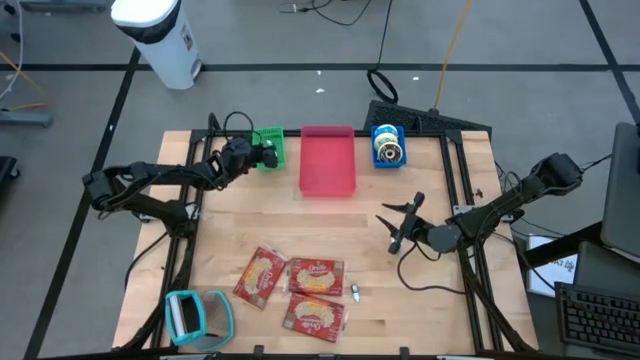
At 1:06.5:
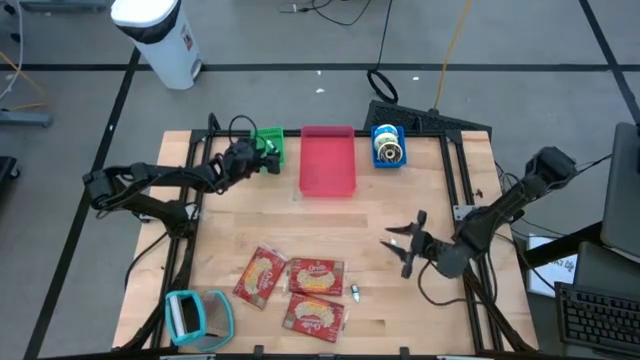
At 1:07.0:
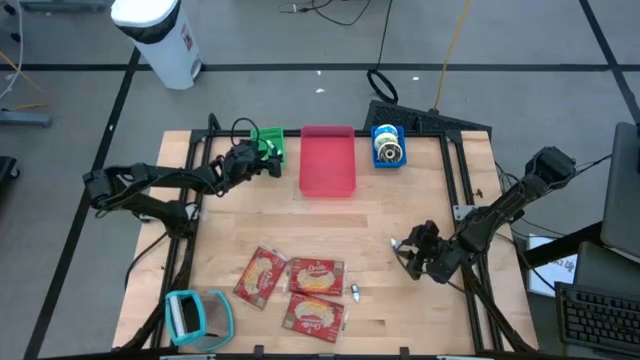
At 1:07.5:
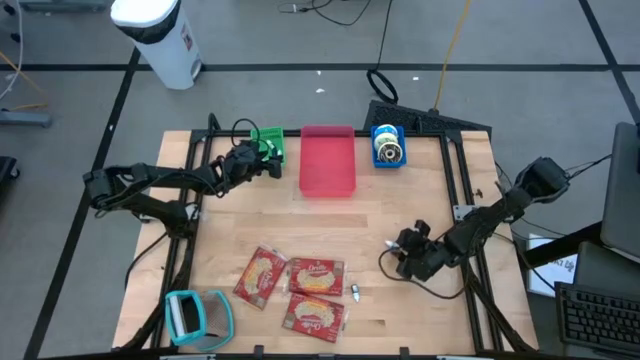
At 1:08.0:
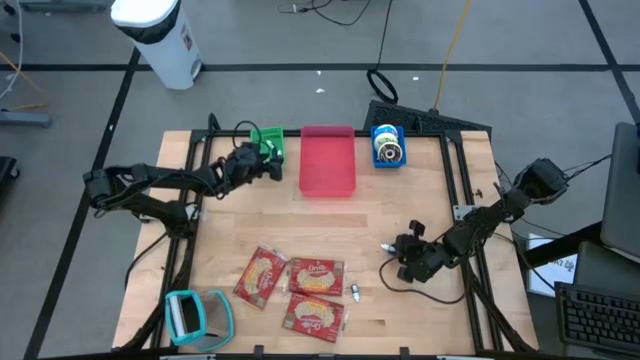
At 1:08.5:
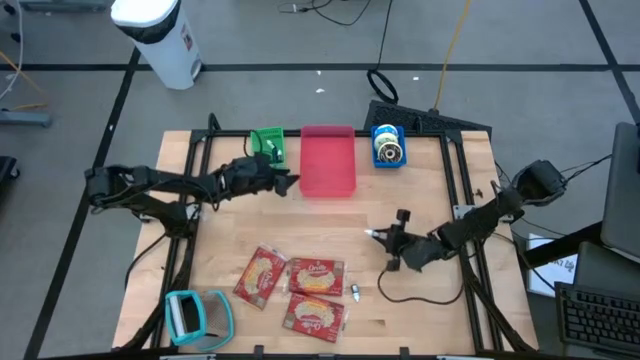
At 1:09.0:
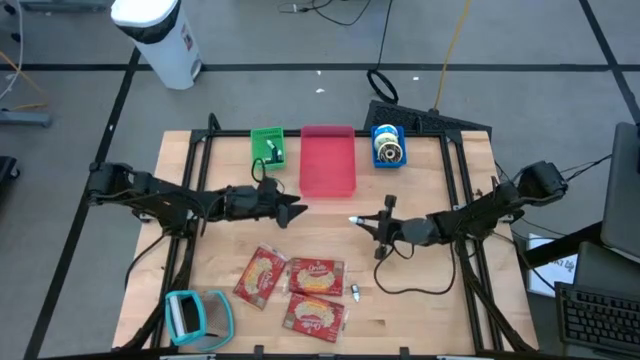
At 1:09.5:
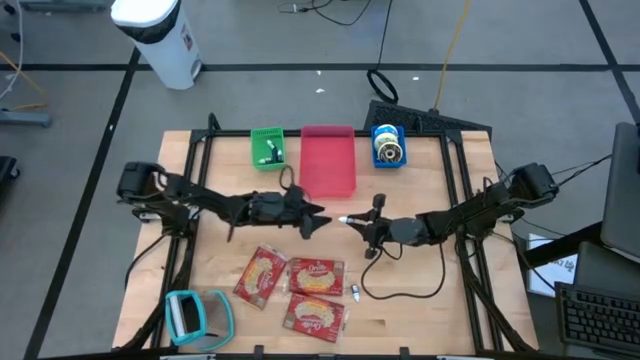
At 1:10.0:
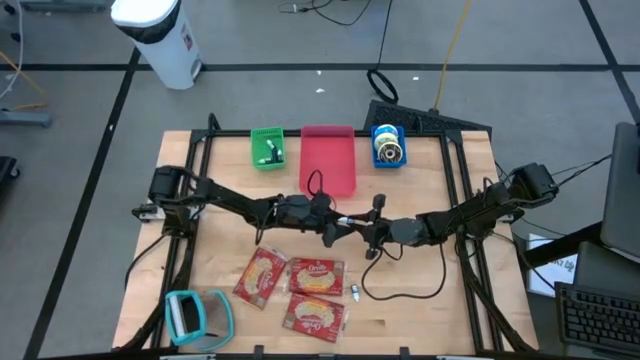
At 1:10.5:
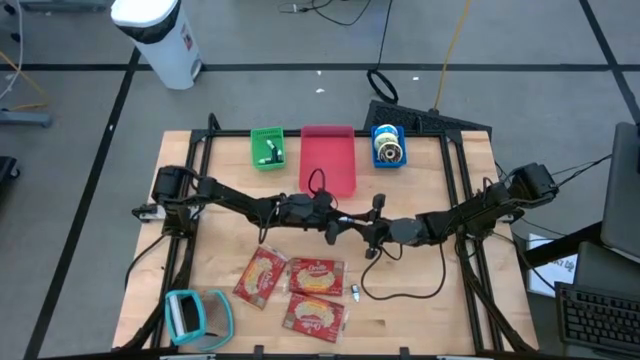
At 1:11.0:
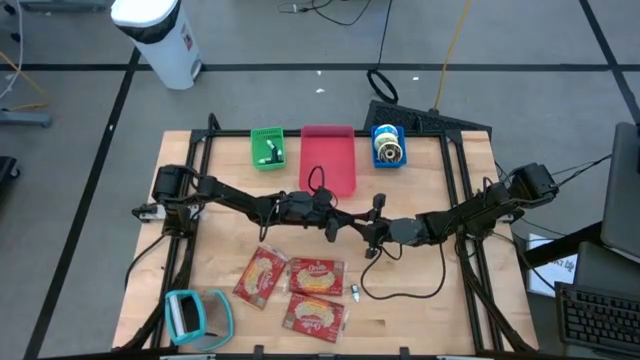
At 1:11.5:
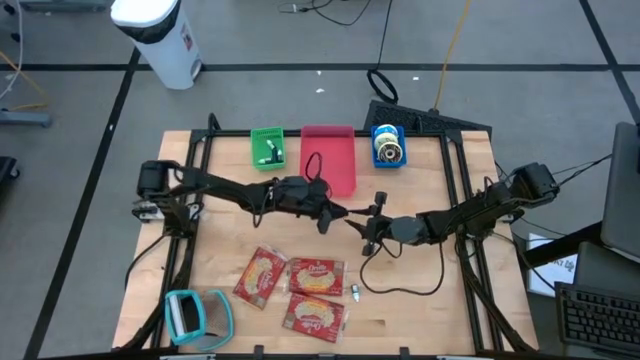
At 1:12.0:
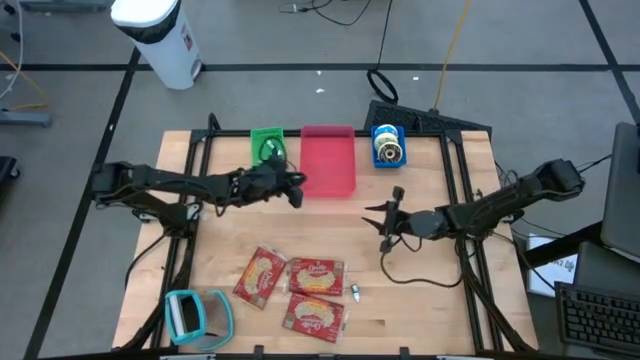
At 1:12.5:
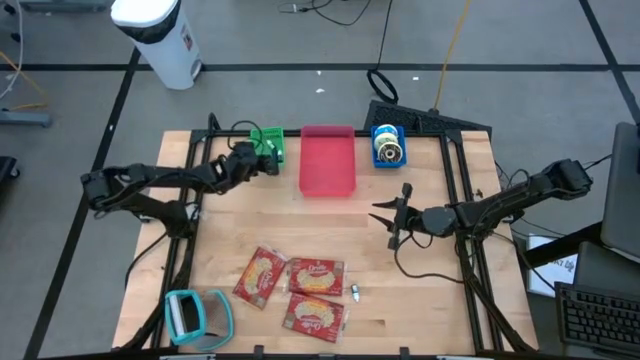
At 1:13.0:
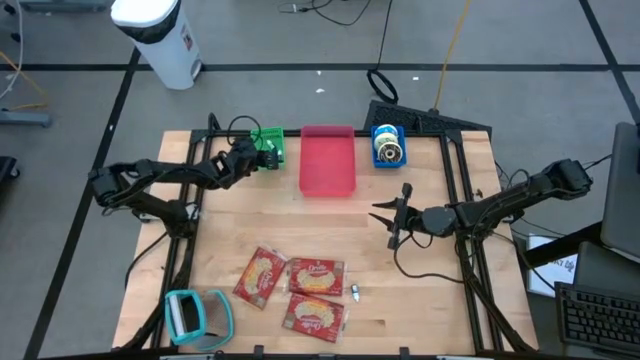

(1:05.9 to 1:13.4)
Put the violet food coloring bottle into the green bin

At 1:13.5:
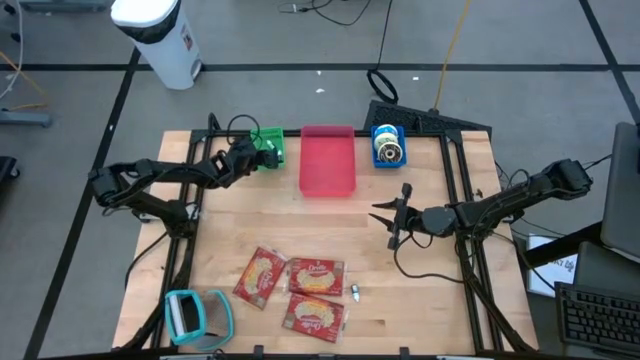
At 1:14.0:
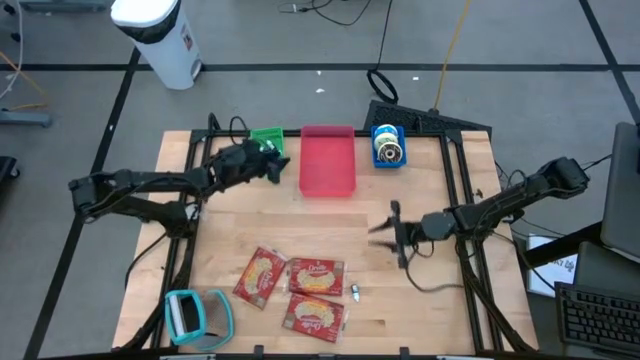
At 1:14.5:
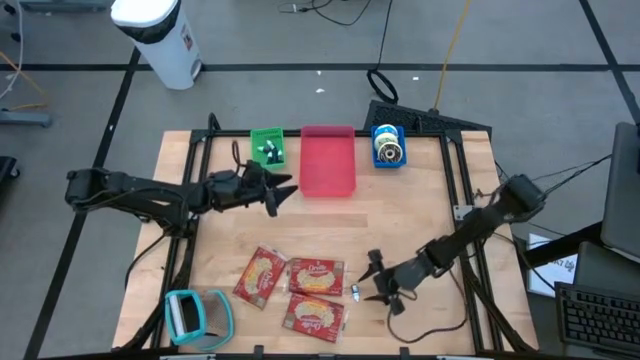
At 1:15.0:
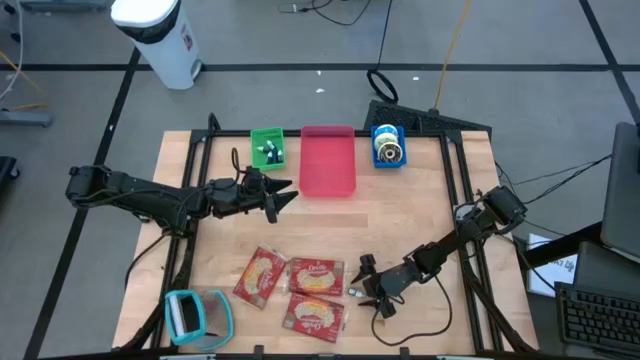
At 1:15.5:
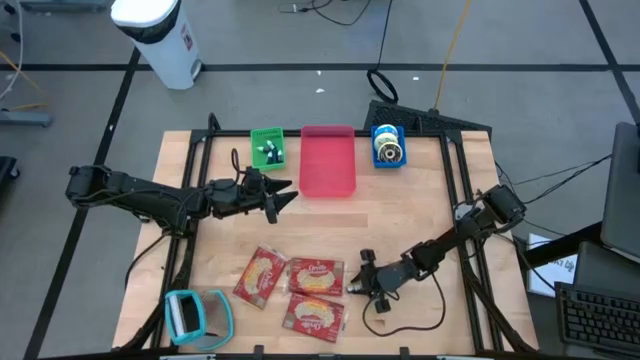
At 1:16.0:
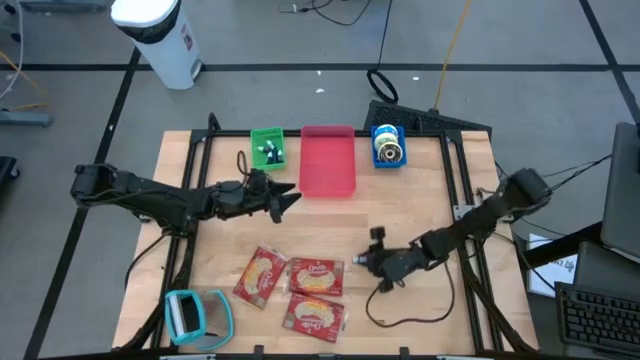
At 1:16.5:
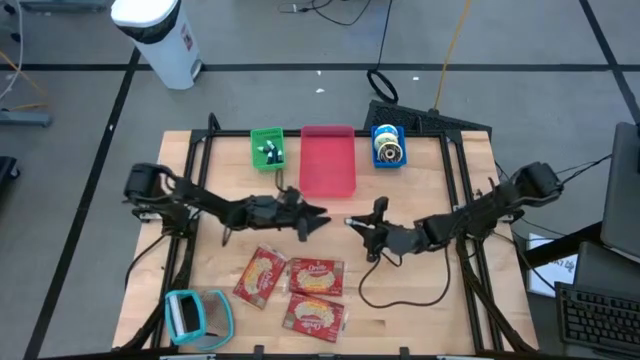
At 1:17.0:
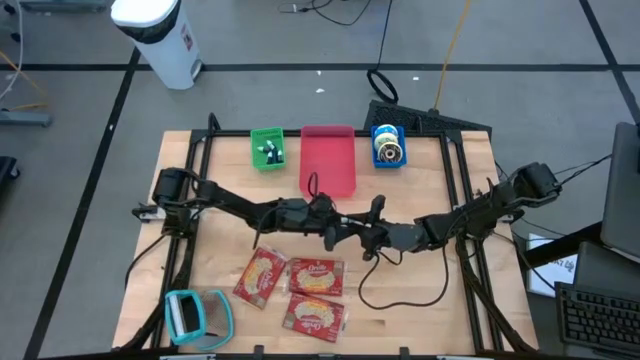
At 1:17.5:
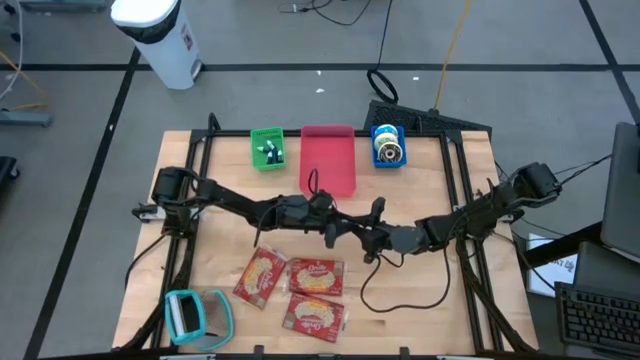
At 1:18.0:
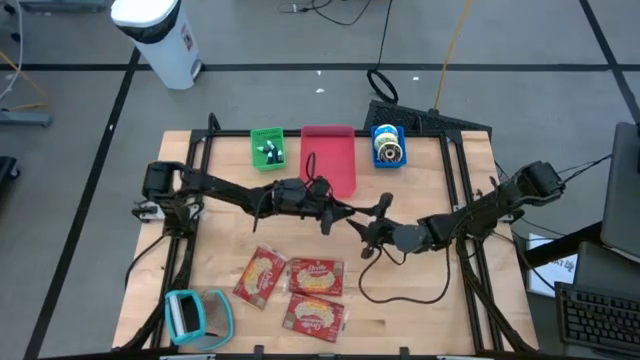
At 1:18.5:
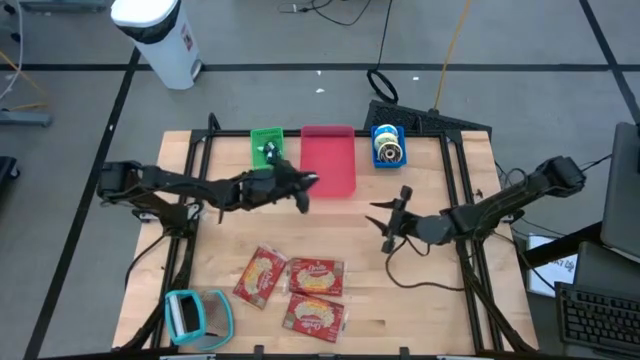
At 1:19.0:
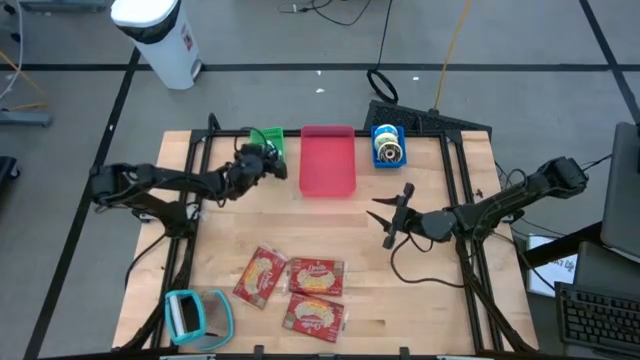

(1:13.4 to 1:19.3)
Put the brown food coloring bottle into the green bin

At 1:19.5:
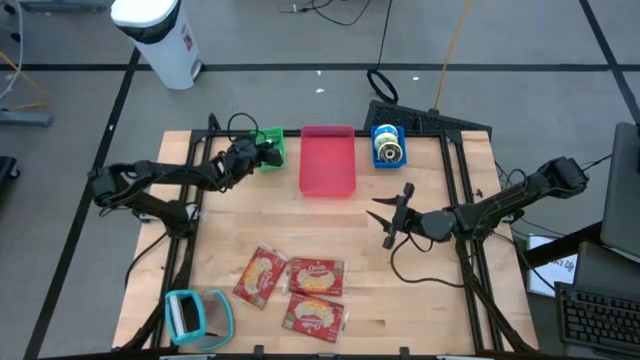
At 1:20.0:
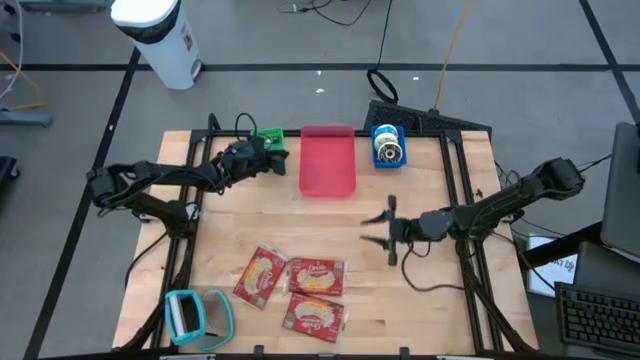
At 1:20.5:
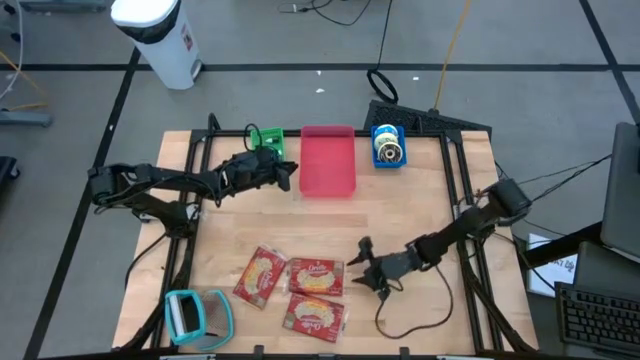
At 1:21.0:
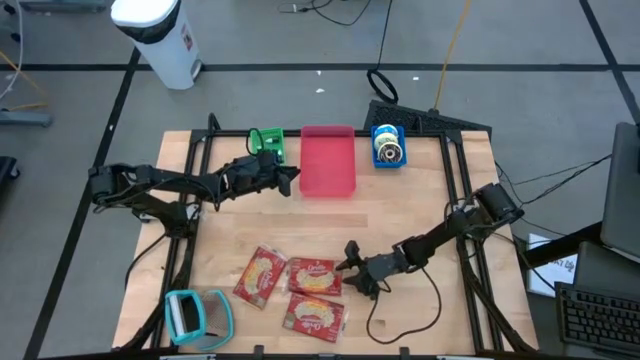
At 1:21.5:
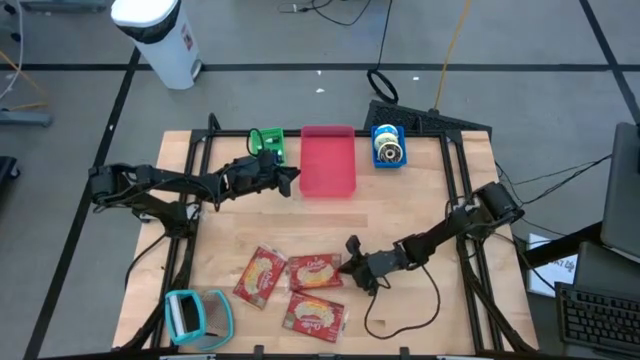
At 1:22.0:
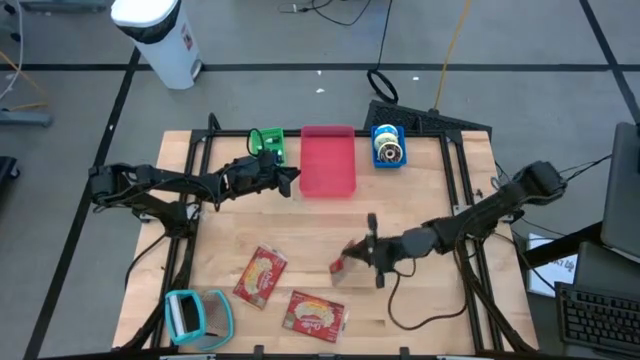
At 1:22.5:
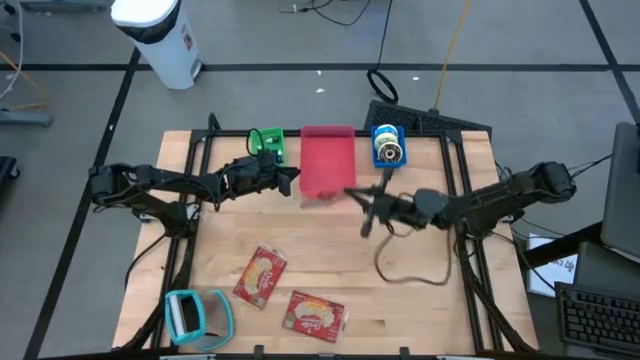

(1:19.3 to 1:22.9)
Put the top right red popcorn bag into the red bin
